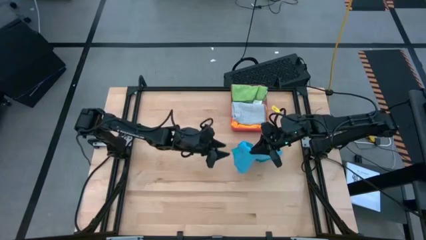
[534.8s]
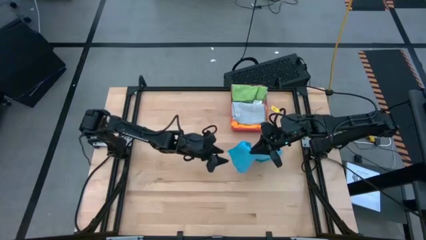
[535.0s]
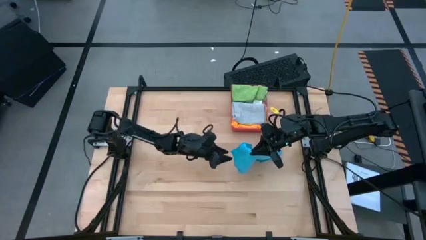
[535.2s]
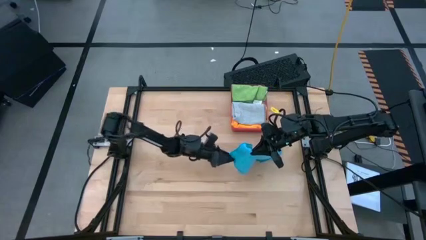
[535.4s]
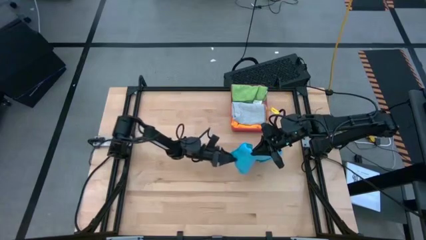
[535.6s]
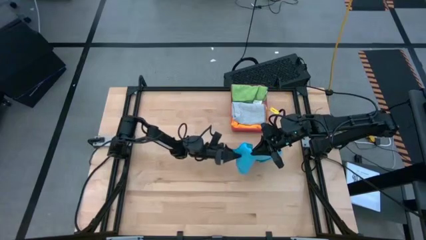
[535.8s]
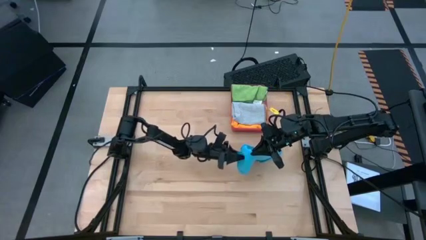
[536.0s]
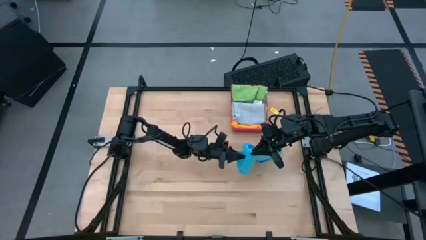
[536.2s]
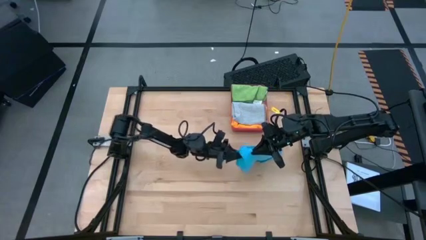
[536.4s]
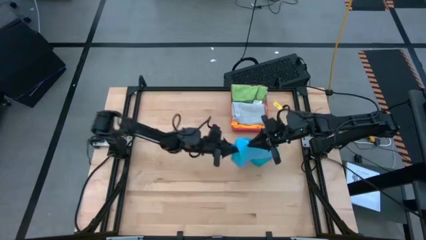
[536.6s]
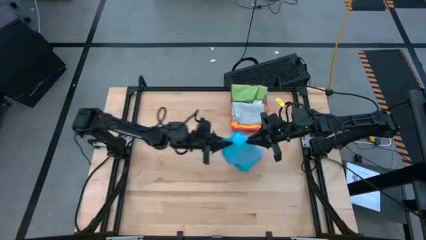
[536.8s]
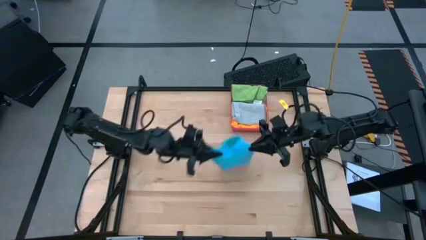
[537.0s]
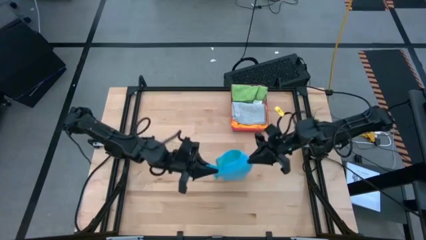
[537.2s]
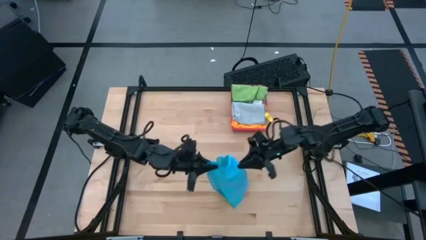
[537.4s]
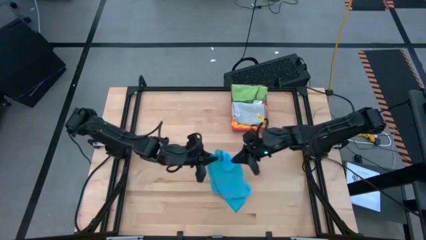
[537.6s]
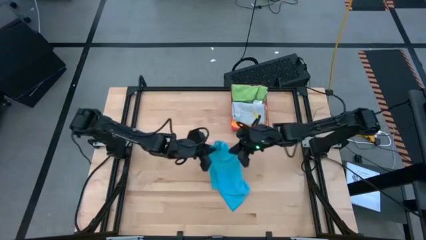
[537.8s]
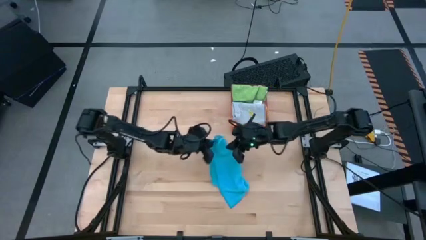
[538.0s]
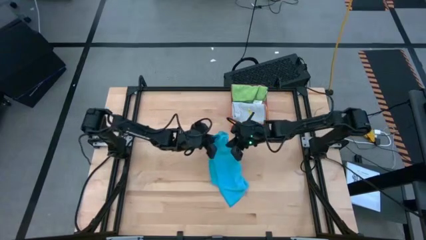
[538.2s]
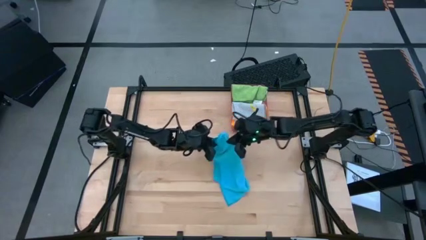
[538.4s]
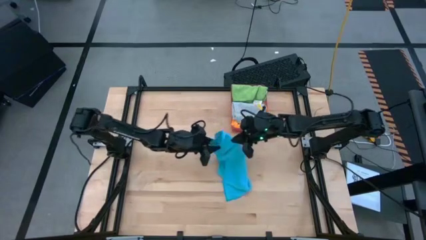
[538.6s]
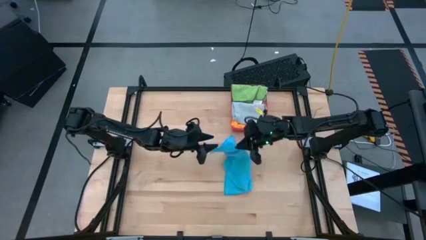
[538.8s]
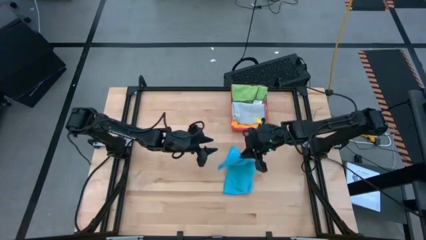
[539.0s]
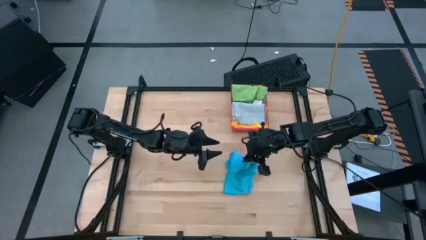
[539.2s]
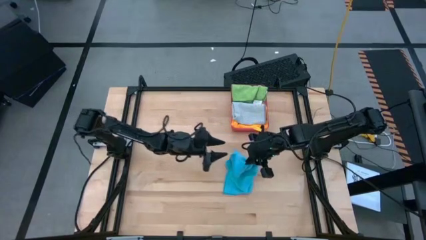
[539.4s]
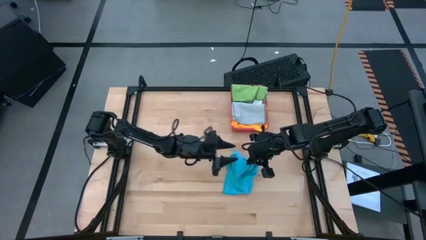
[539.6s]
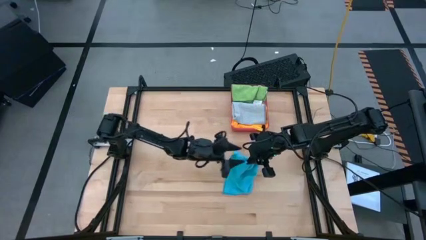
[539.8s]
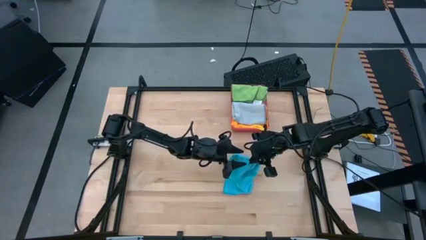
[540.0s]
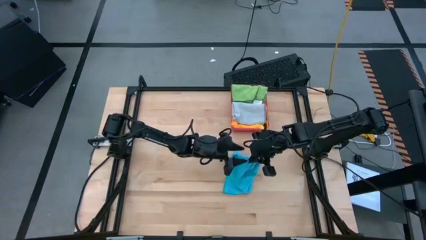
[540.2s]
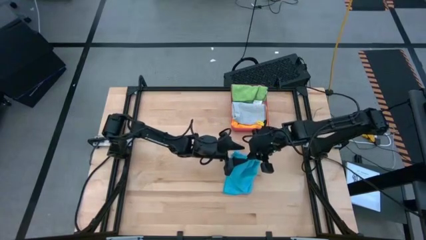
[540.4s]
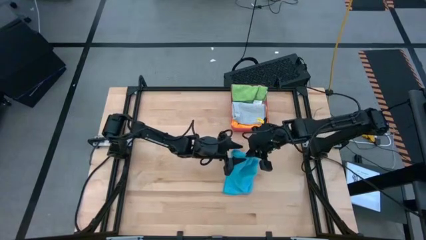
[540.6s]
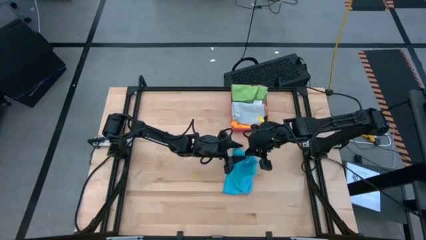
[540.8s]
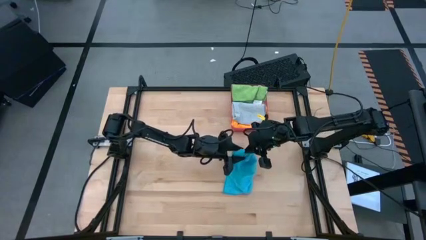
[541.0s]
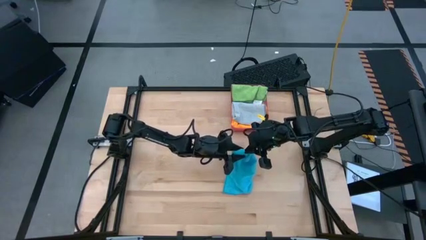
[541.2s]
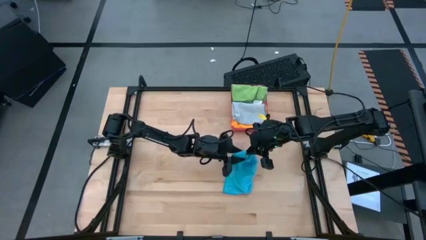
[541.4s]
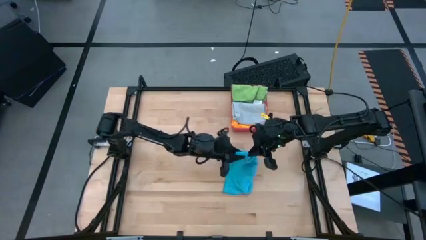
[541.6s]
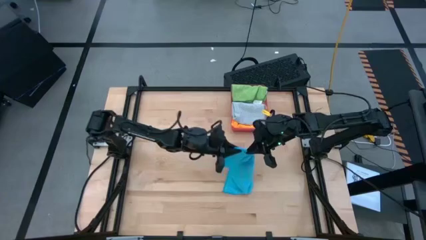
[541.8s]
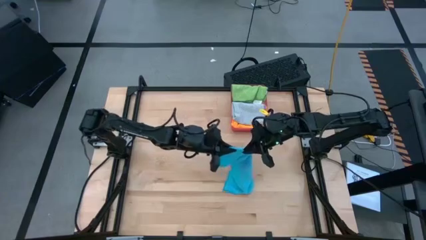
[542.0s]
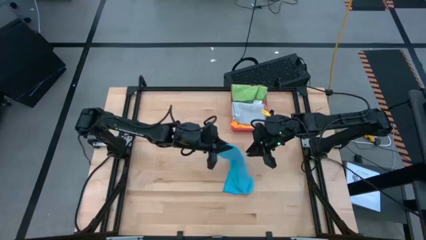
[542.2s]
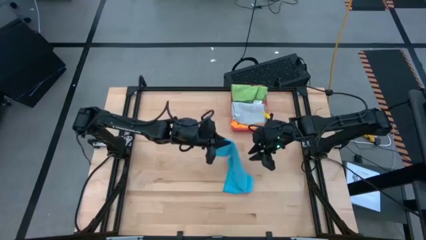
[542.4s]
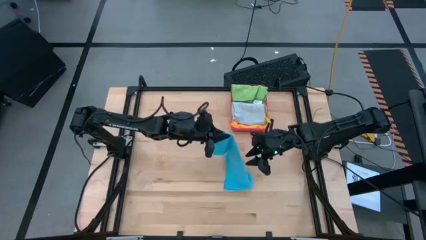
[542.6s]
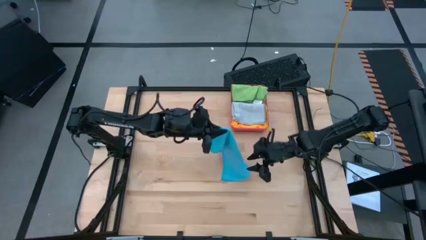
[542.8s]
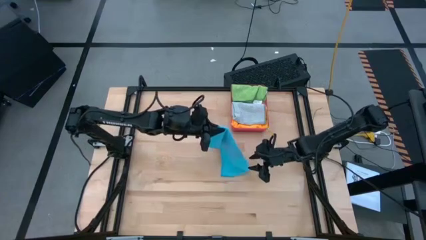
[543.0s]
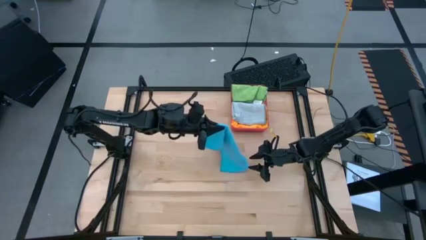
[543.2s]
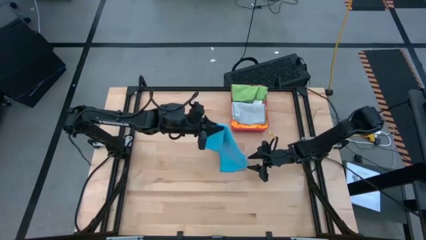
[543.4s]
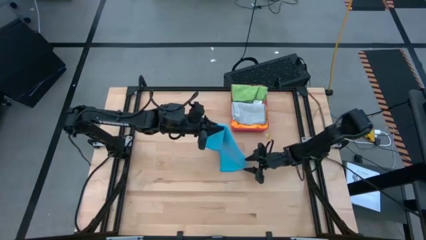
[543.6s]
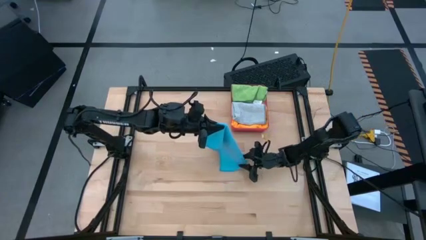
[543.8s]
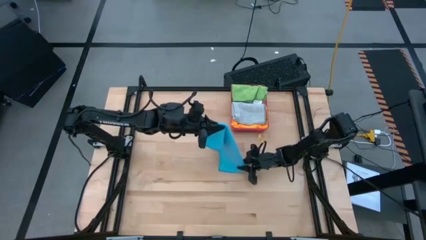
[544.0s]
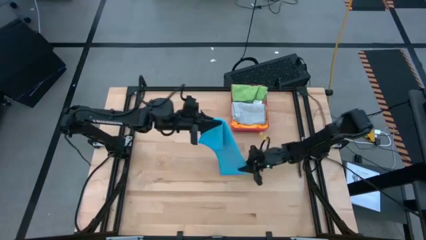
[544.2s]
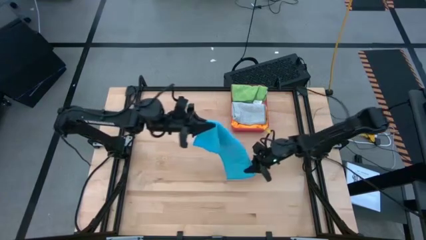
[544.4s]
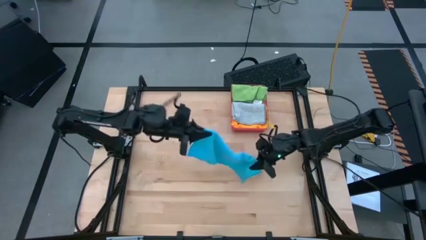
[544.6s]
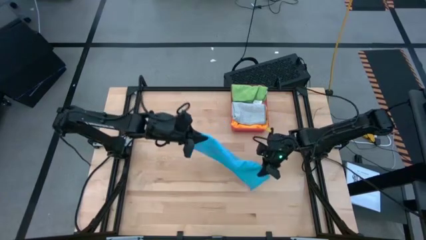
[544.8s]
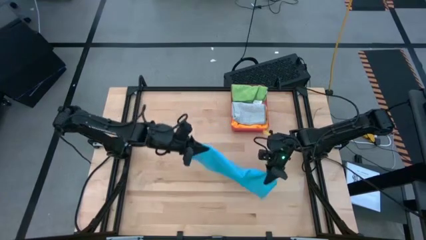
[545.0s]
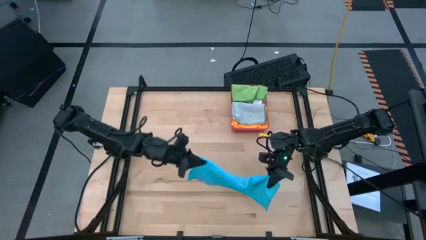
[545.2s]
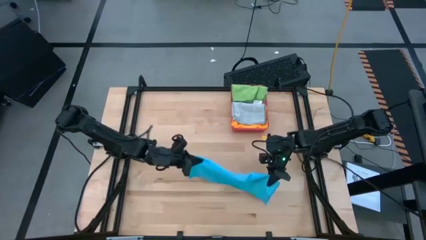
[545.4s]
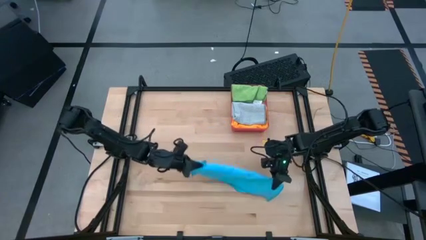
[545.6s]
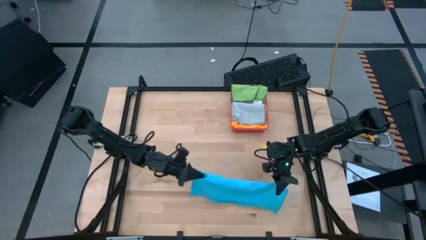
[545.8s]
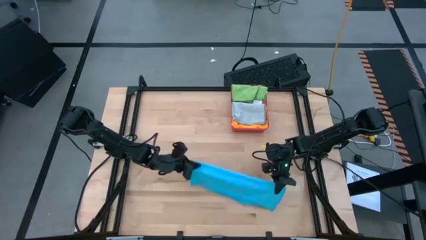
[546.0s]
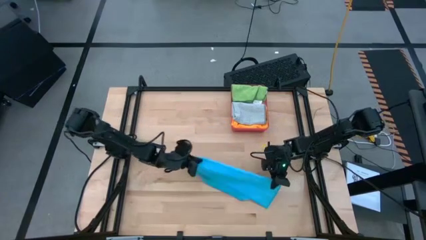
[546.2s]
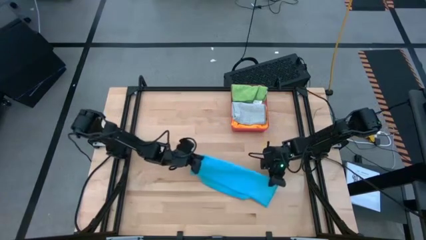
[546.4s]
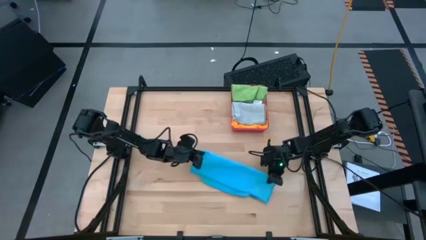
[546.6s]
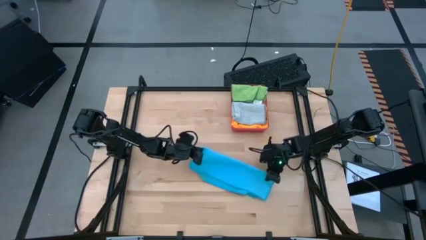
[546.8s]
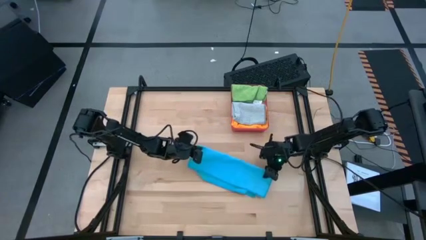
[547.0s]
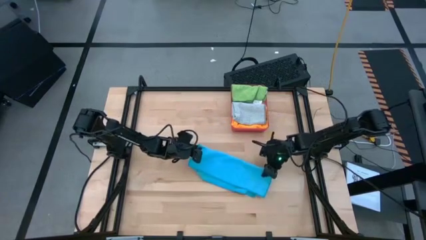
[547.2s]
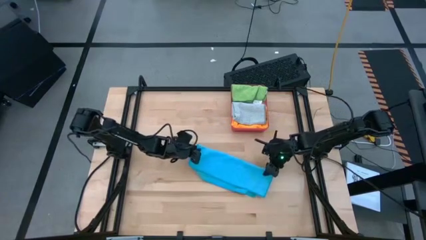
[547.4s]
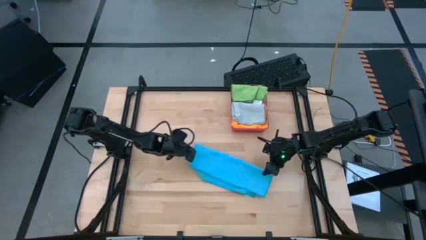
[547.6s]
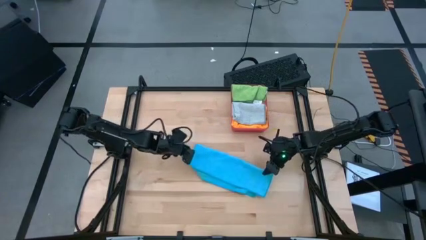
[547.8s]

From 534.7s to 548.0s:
Task: Fold microfiber towels
Fold the blue microfiber cloth

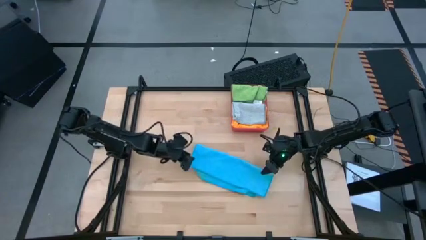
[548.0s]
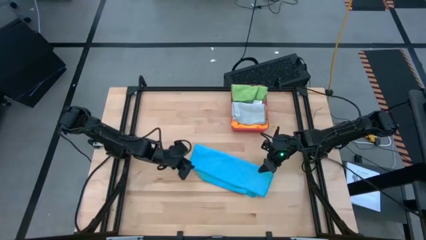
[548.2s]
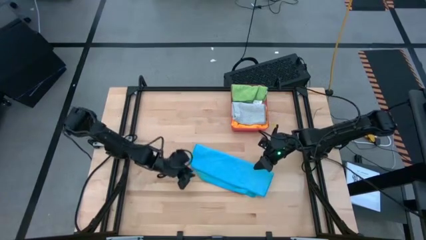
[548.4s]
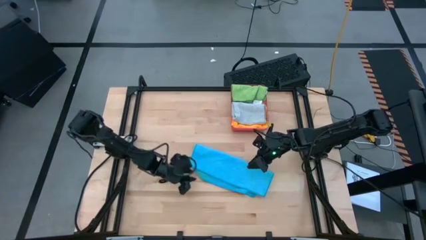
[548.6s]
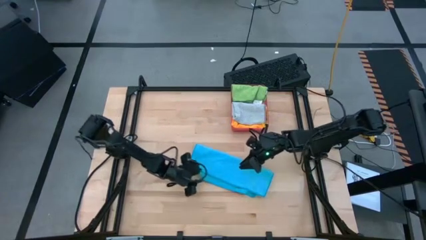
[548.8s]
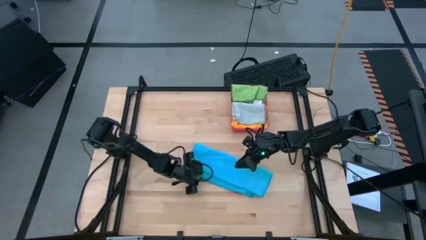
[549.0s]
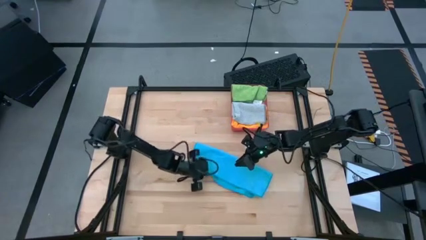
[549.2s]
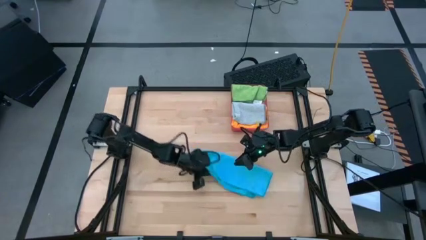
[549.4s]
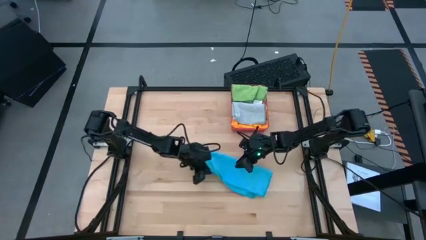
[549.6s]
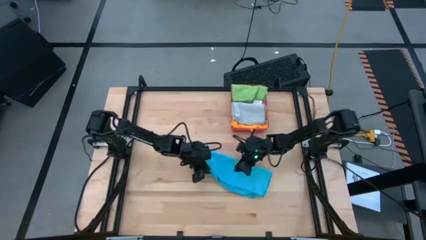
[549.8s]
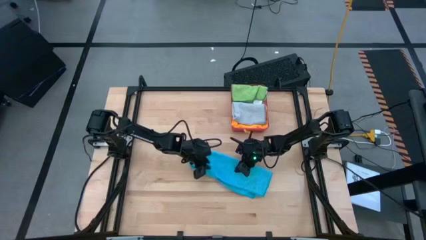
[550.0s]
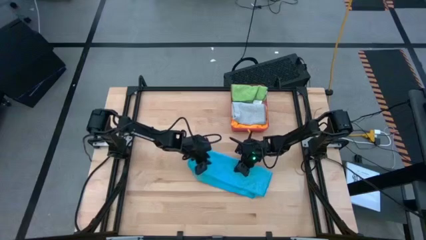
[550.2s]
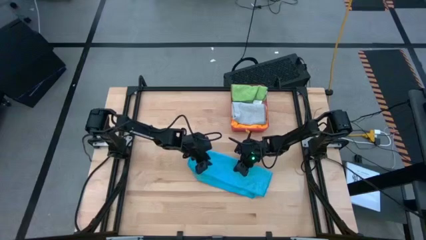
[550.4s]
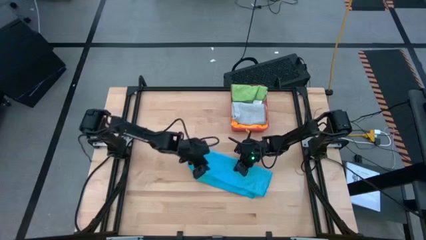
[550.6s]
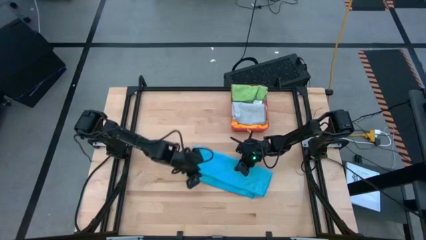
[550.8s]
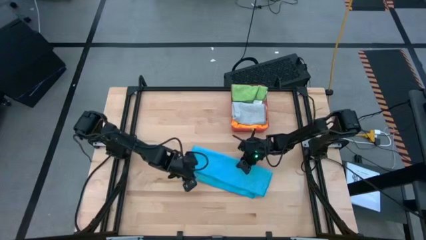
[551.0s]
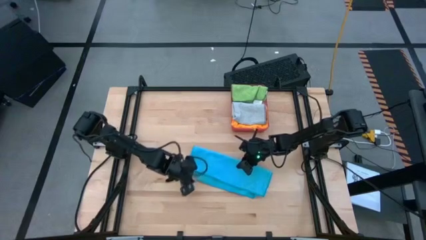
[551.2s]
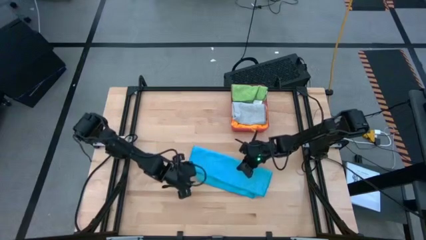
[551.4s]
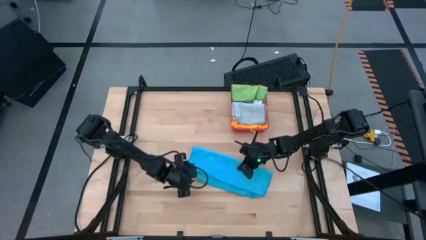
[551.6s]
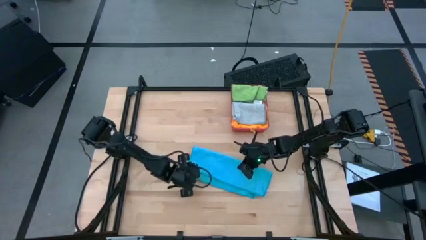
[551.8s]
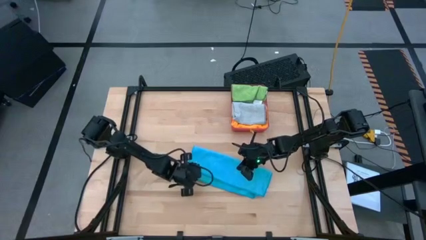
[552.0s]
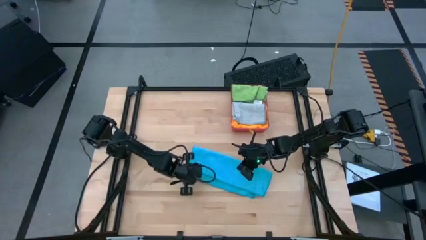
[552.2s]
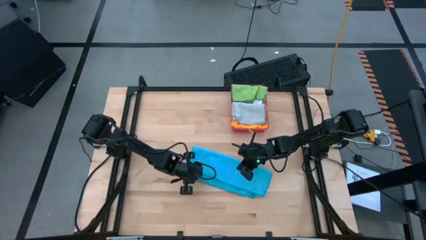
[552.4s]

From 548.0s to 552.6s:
Fold the blue microfiber cloth
